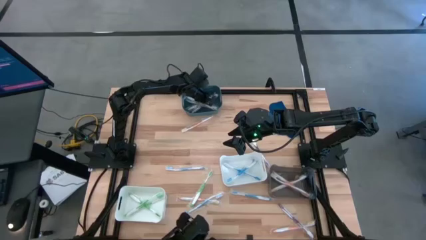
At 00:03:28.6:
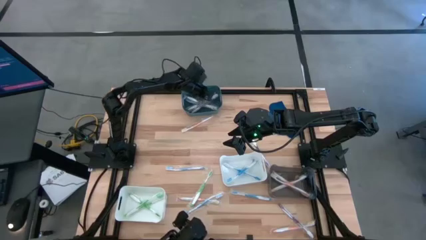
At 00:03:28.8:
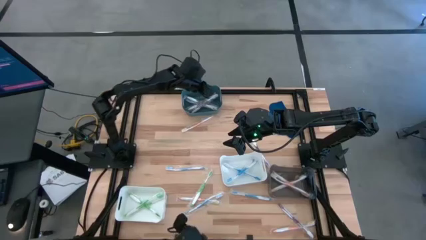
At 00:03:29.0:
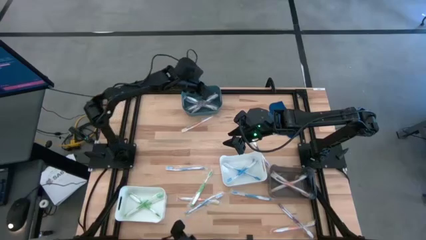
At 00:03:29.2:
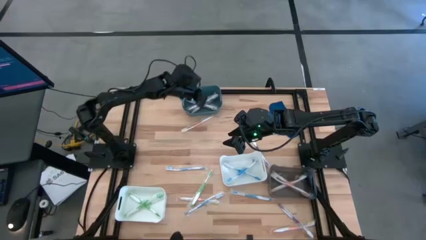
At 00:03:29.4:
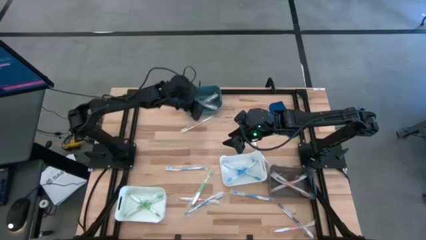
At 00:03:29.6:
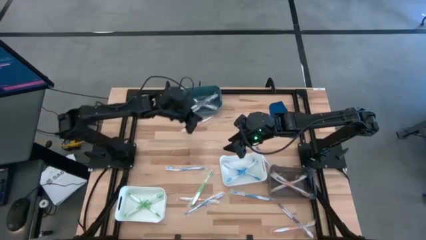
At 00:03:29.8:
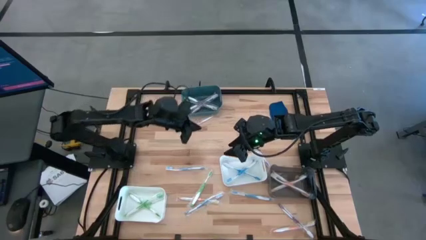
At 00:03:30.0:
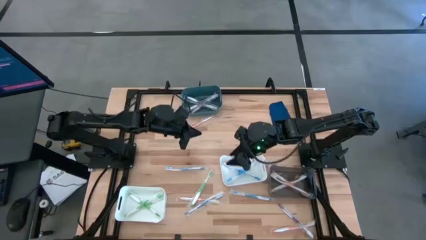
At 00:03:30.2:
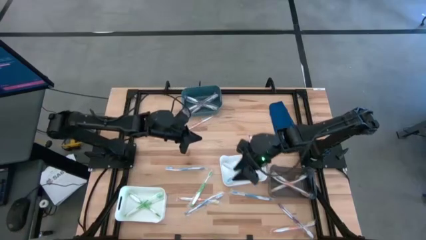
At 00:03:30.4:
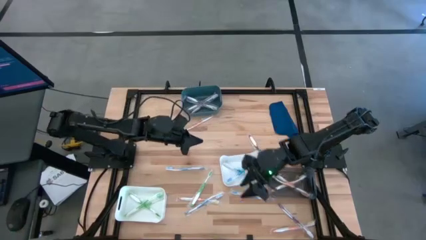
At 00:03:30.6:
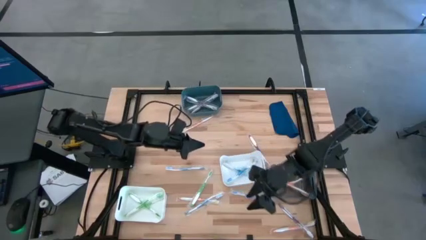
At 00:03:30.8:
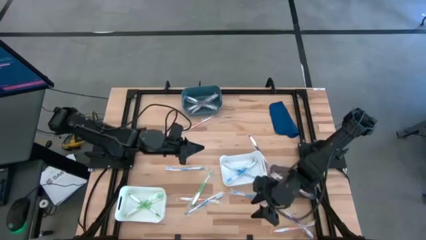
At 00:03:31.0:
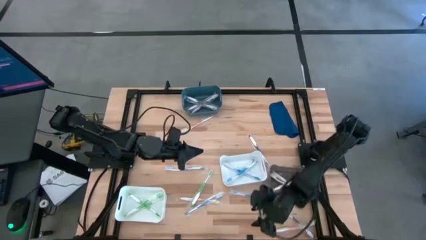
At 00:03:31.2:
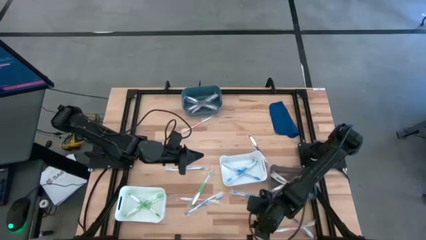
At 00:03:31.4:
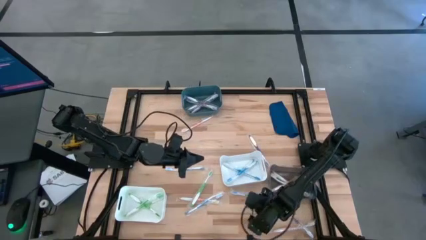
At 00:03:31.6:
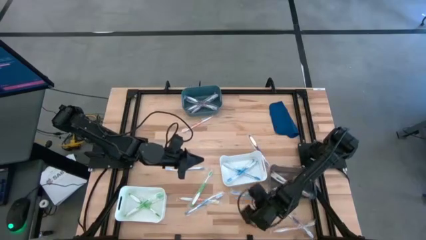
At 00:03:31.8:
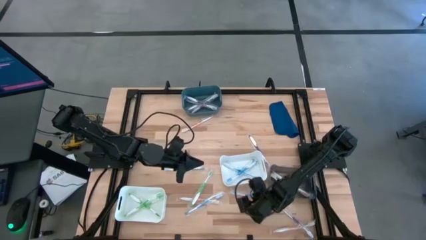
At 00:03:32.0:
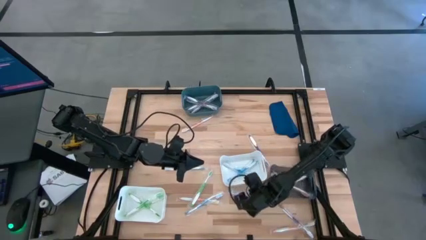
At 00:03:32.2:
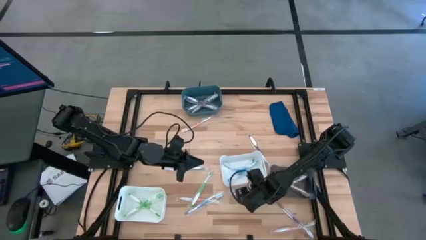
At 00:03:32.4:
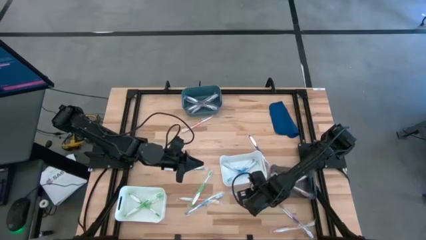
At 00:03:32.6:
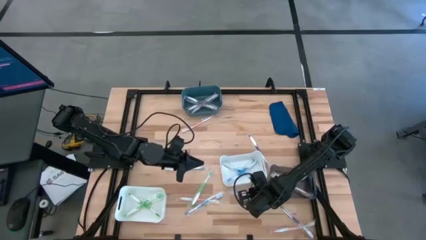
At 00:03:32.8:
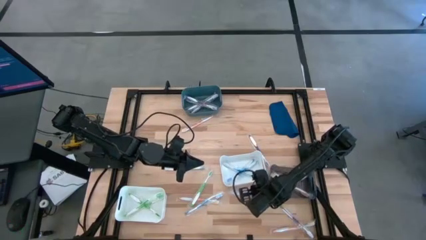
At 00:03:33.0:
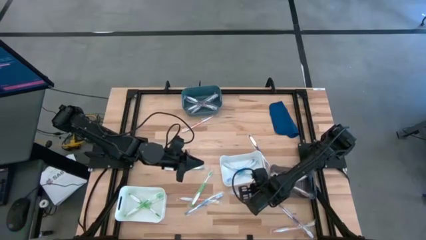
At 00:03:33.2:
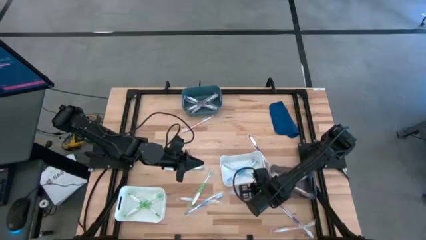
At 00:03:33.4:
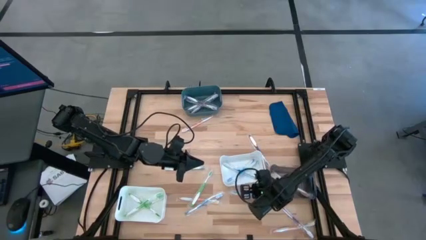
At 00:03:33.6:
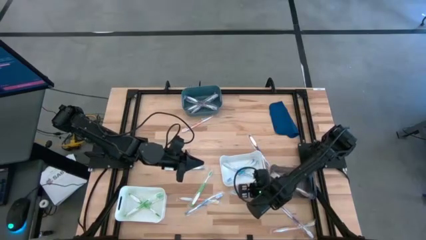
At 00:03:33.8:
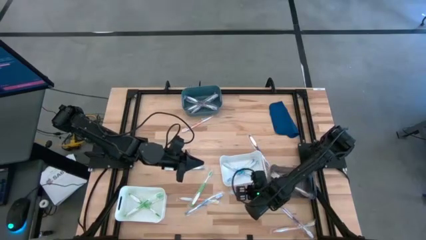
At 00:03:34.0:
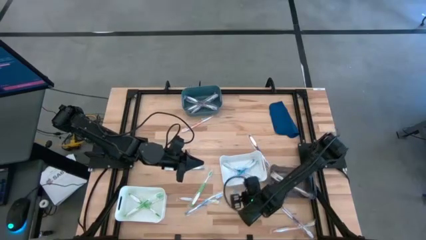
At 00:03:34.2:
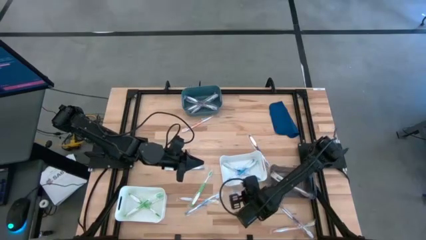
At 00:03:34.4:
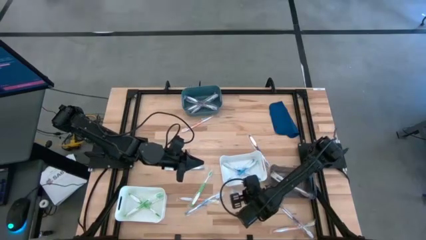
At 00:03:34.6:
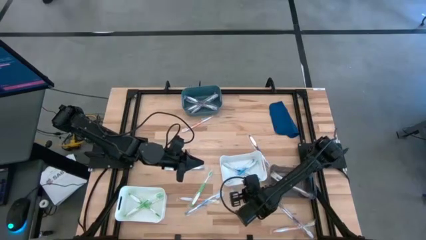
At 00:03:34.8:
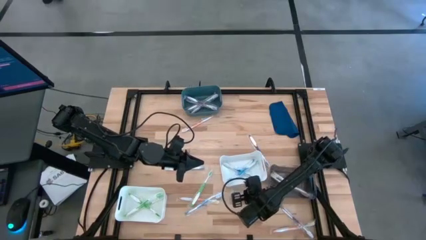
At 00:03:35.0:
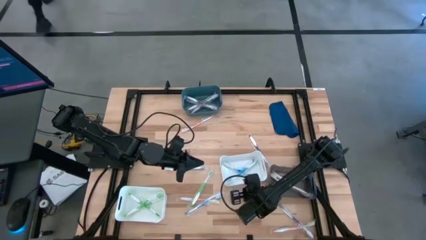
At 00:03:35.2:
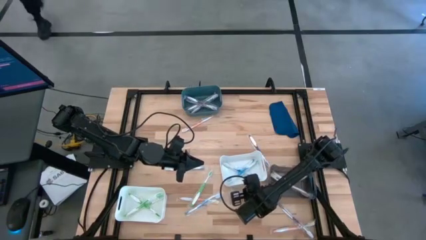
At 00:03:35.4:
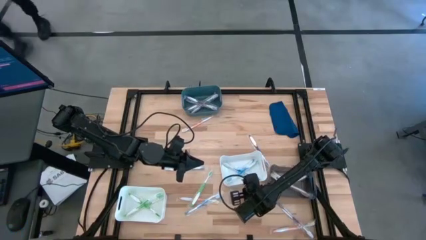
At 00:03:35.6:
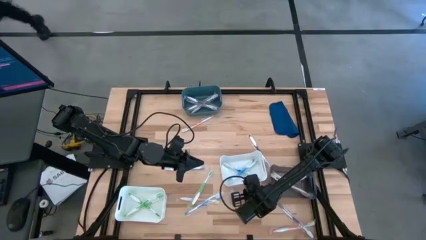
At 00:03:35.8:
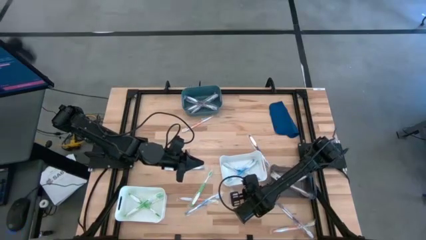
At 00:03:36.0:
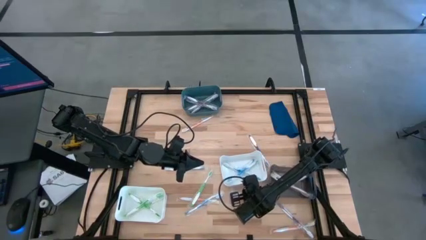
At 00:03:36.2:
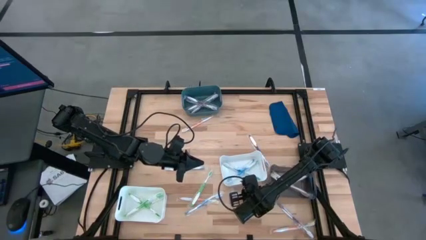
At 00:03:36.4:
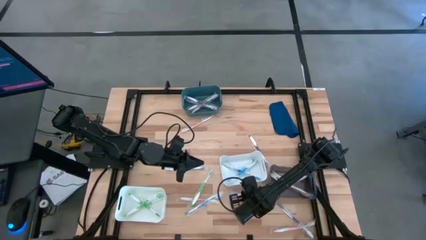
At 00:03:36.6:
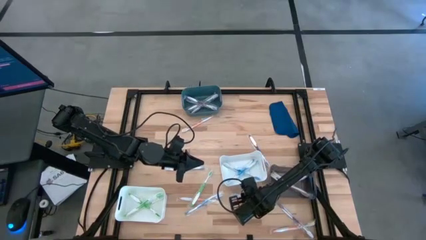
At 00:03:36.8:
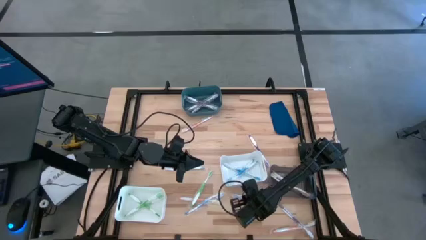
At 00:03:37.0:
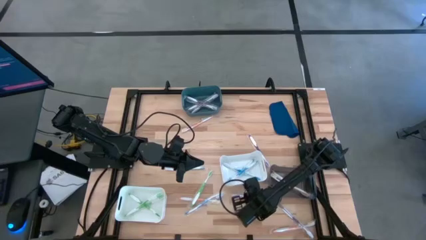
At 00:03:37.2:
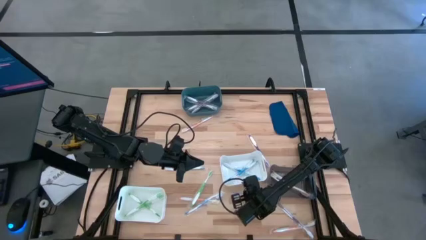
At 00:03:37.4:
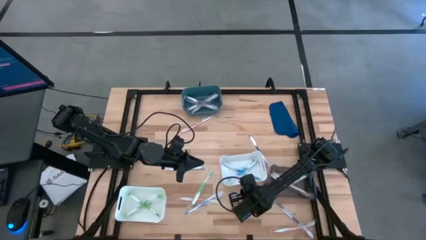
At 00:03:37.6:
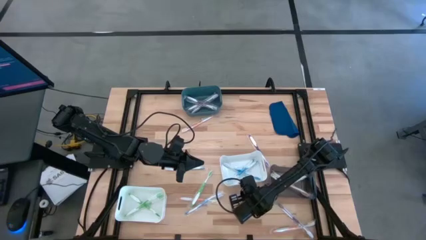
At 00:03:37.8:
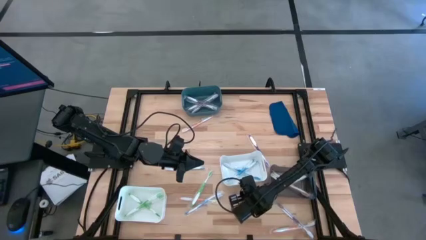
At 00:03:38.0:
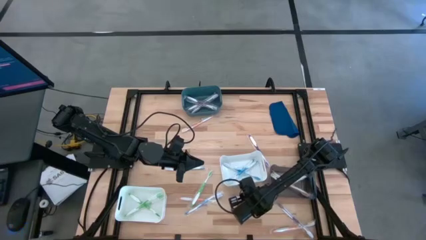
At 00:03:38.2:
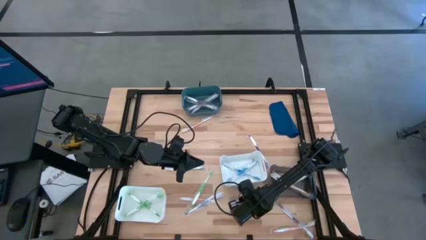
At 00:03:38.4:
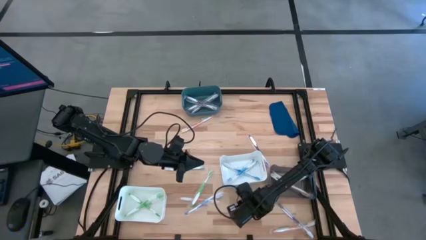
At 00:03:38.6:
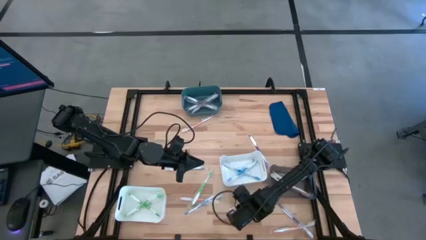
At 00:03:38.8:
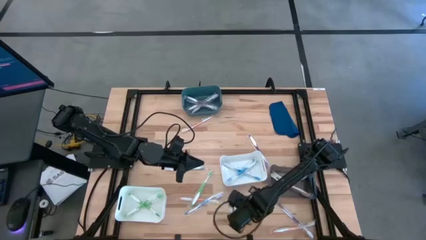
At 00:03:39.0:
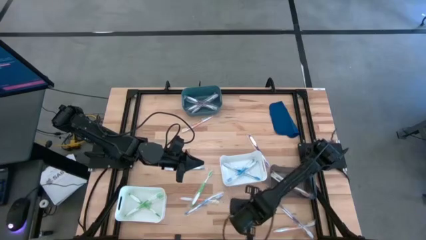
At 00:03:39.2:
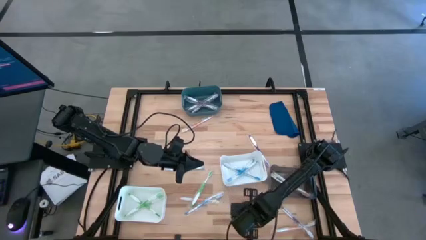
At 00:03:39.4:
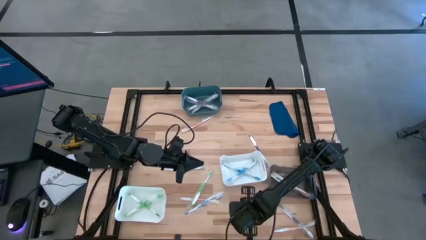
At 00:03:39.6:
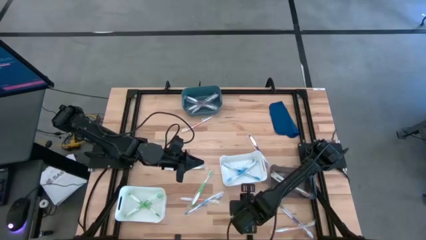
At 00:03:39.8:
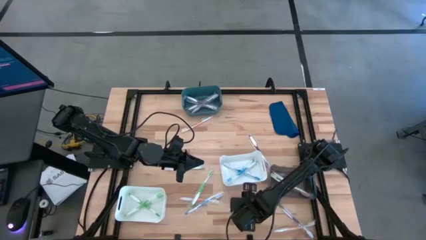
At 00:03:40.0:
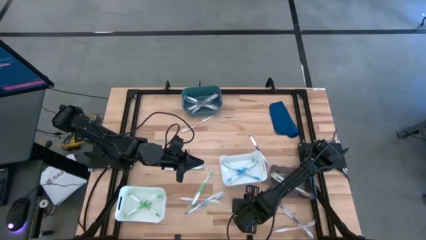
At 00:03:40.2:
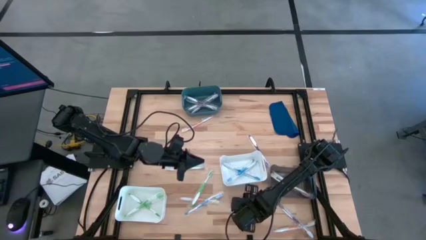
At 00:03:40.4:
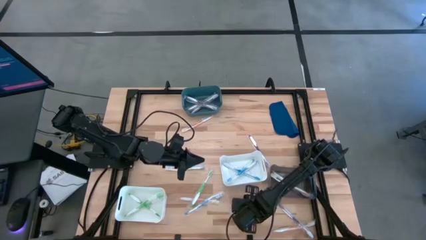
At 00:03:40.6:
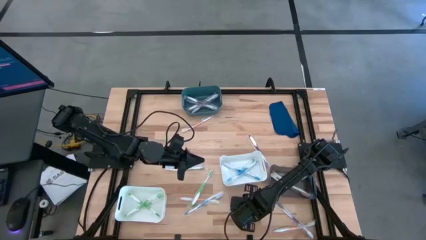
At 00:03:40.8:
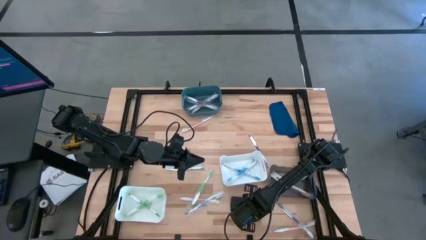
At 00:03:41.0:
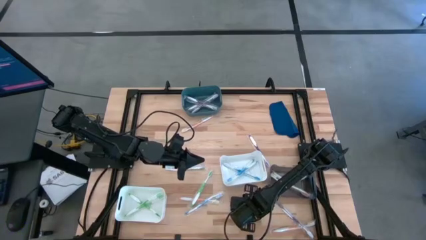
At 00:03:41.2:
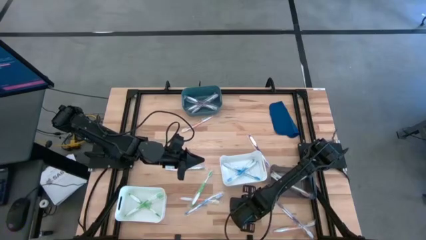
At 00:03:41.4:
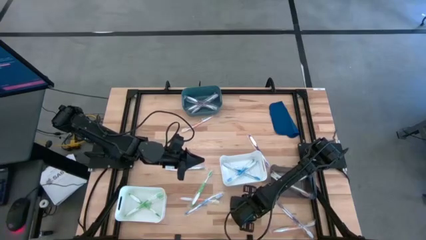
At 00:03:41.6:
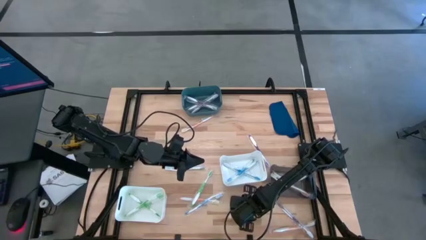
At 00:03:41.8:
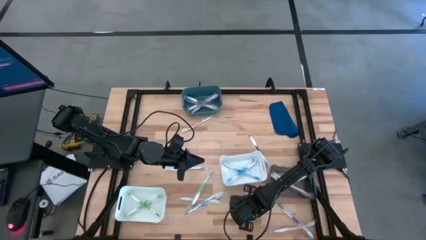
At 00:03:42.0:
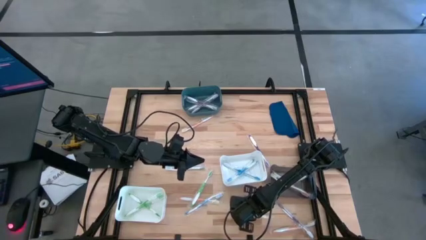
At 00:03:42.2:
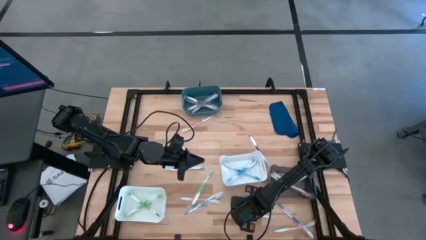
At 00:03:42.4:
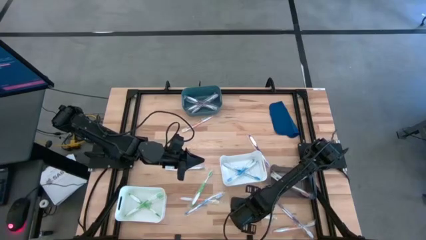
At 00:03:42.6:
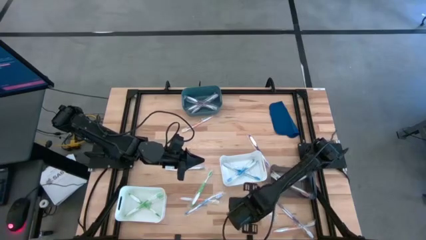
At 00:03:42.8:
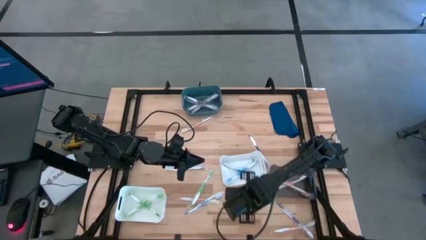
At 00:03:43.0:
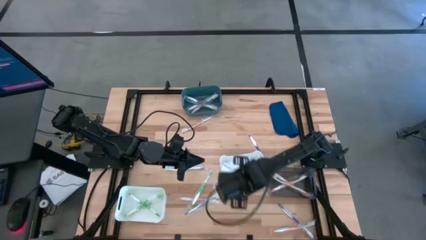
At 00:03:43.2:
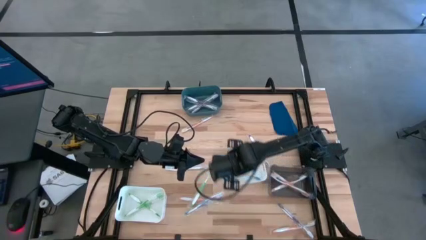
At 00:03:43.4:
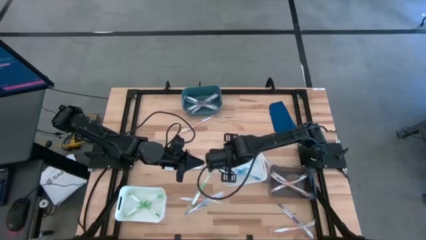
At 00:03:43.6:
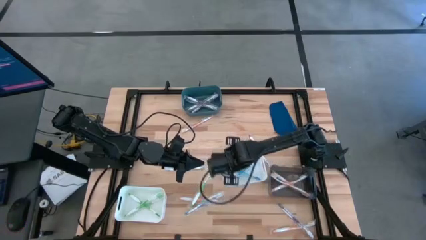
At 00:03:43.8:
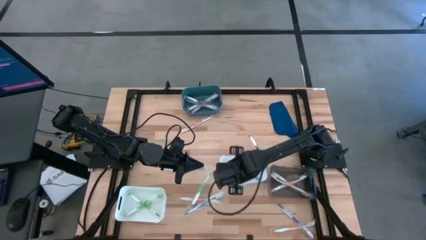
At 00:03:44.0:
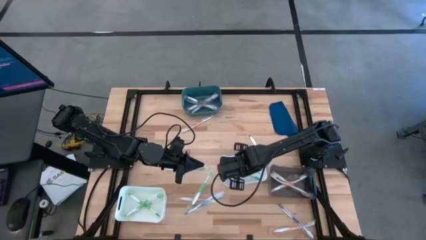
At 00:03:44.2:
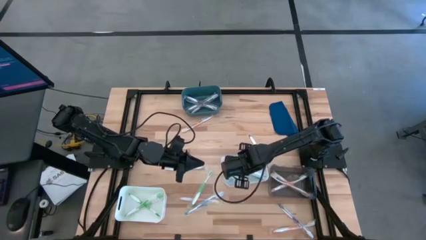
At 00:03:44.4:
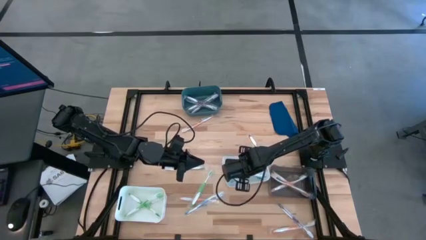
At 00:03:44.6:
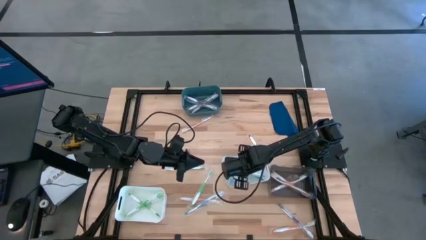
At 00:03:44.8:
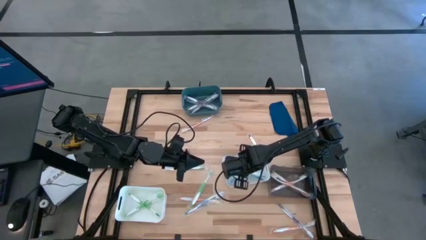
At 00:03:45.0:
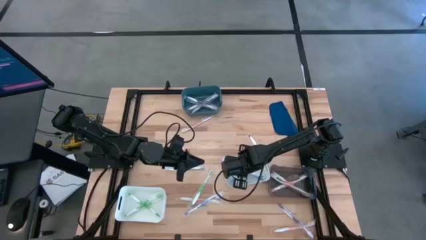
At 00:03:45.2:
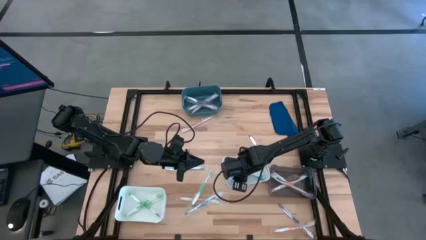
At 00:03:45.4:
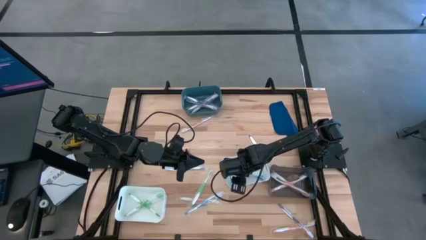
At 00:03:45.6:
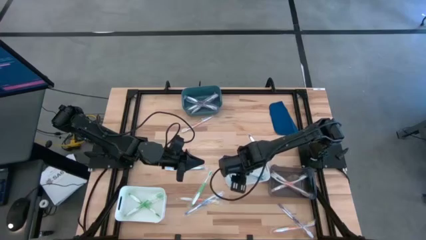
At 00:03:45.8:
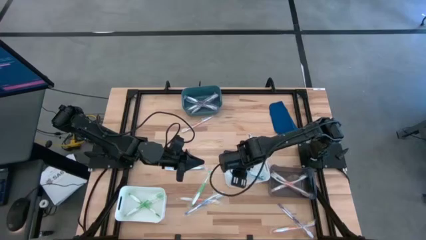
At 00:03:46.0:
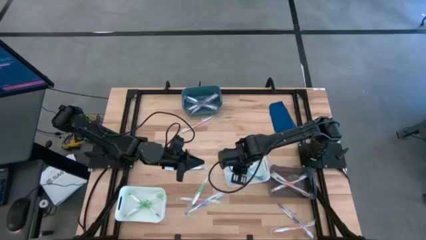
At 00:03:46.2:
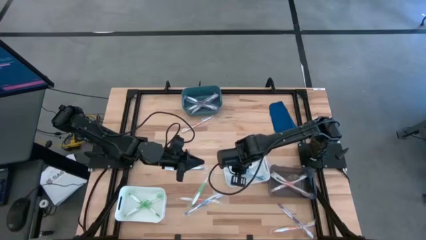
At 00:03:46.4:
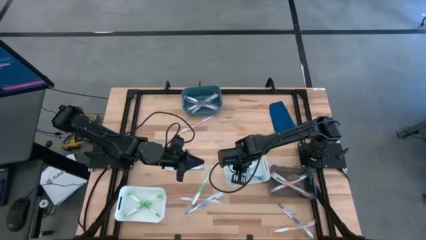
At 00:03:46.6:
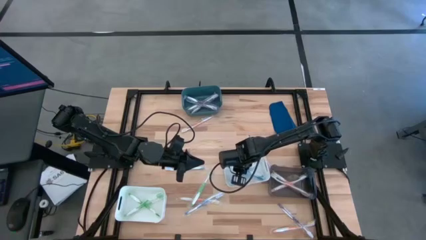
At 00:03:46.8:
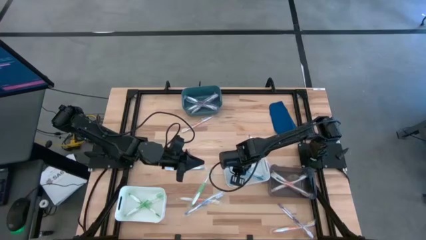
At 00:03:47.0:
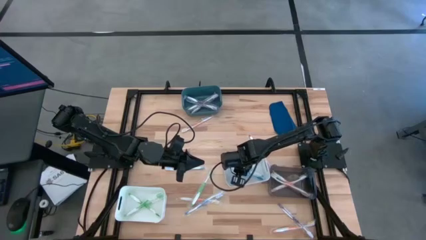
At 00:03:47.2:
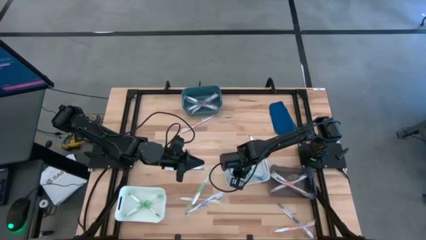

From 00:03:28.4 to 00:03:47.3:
Task: Pick & Place Toothbrushes
Put the blue toothbrush into the top white bin
